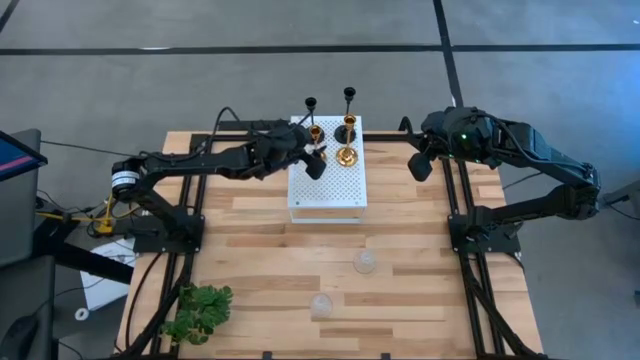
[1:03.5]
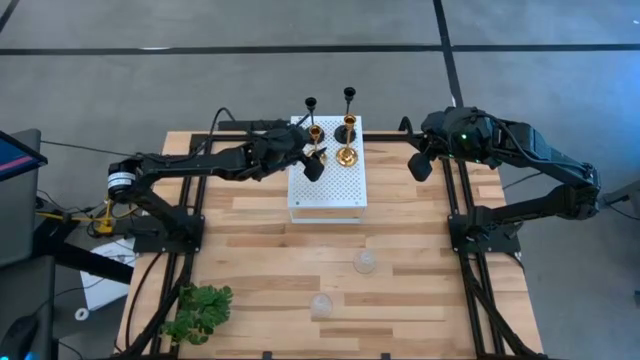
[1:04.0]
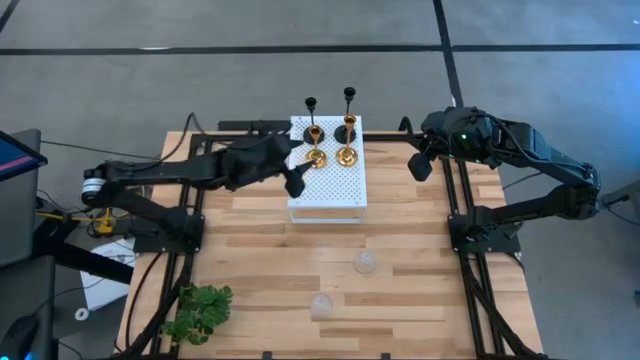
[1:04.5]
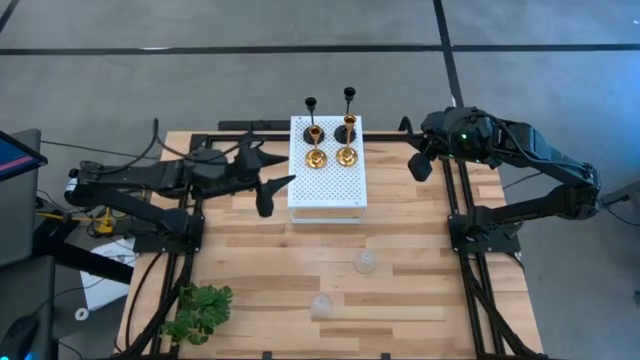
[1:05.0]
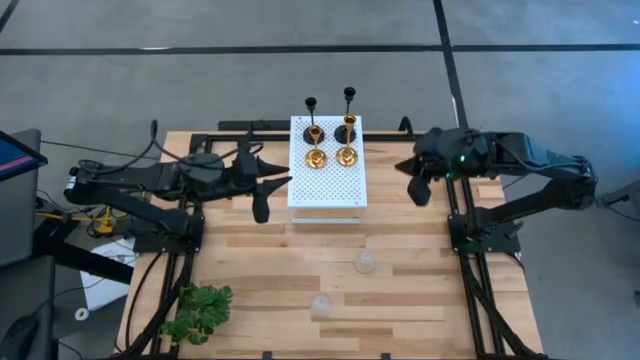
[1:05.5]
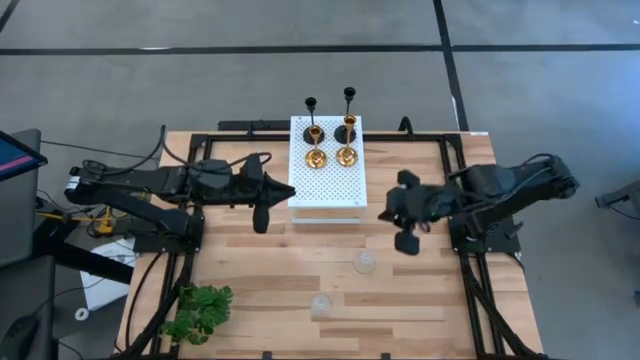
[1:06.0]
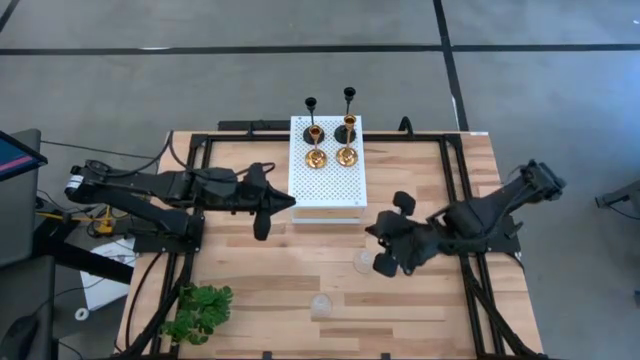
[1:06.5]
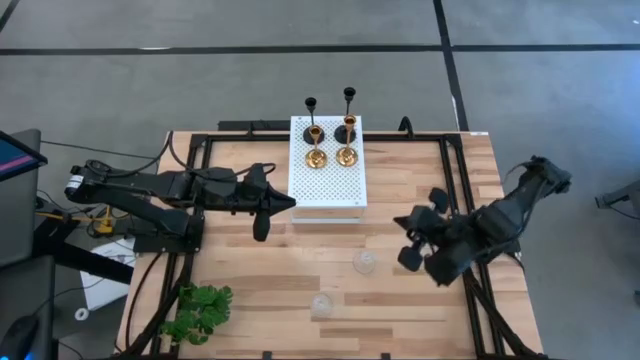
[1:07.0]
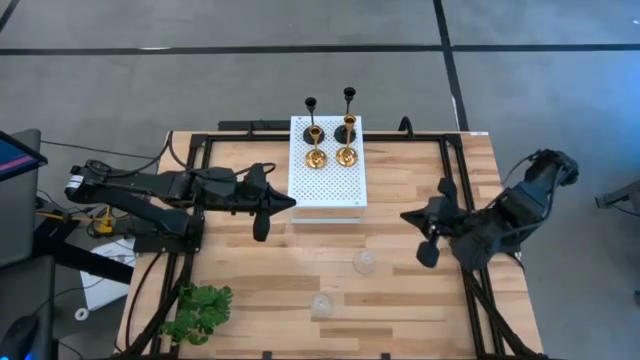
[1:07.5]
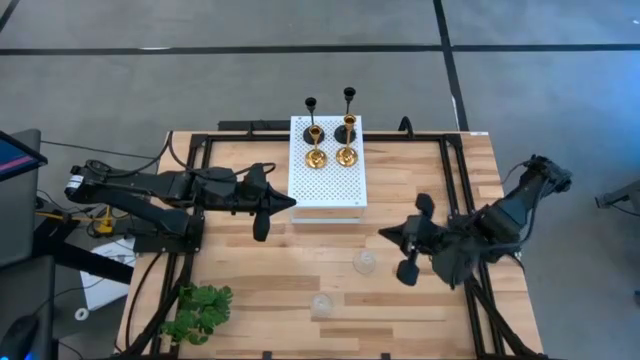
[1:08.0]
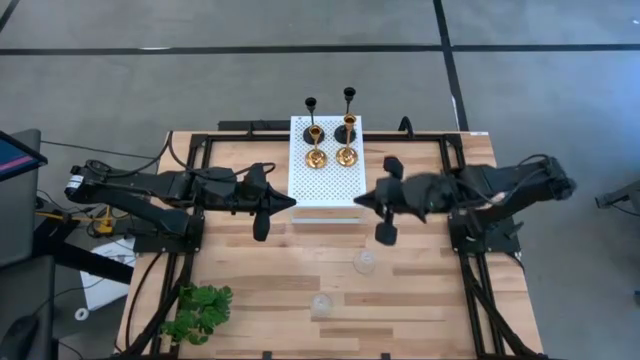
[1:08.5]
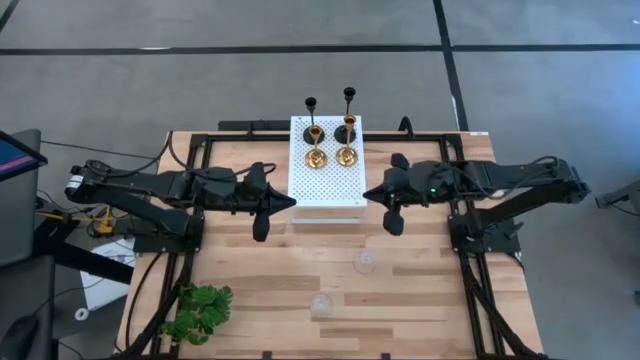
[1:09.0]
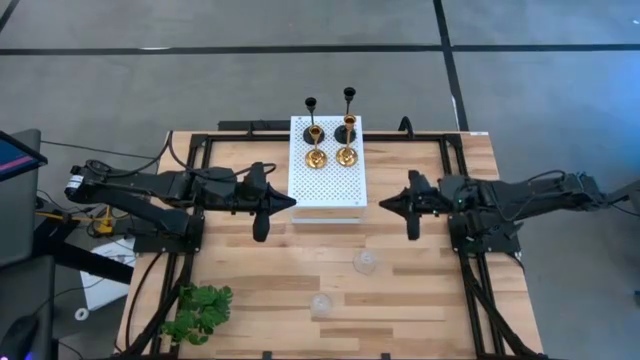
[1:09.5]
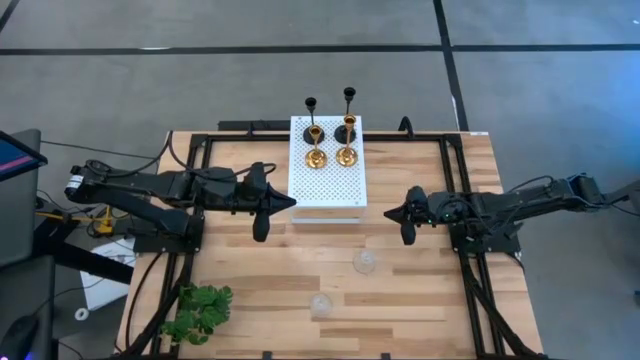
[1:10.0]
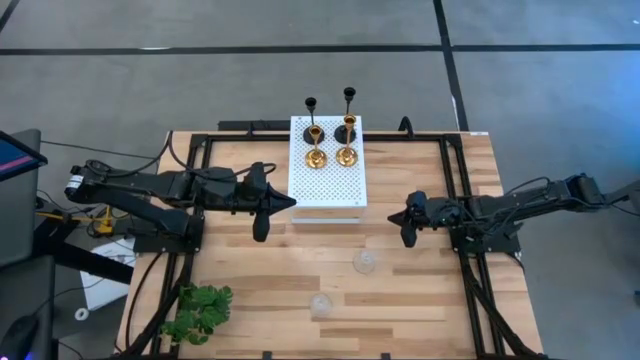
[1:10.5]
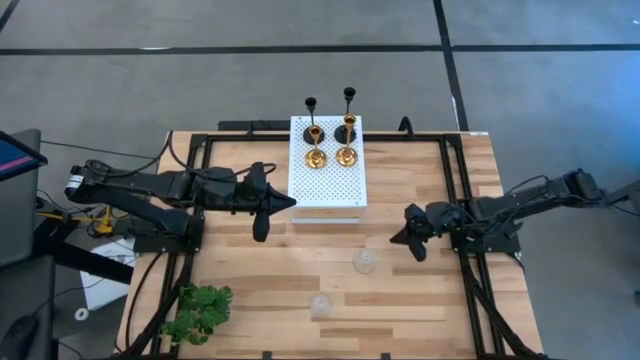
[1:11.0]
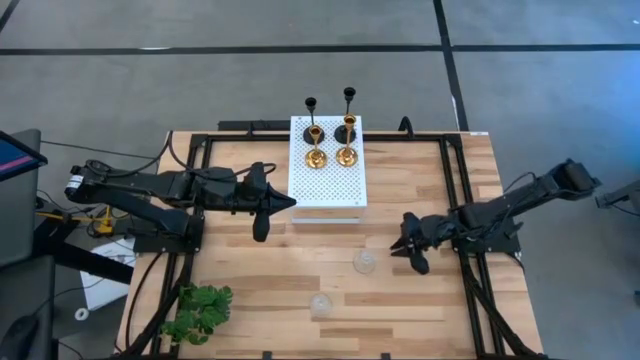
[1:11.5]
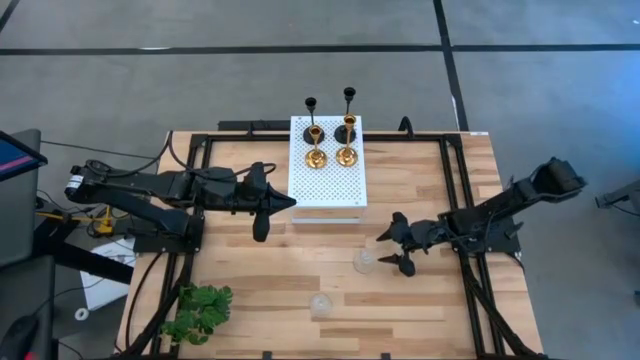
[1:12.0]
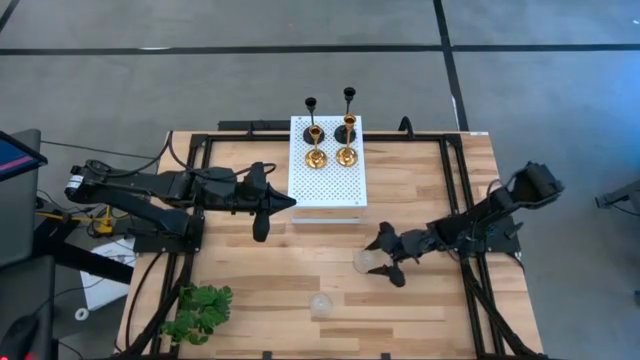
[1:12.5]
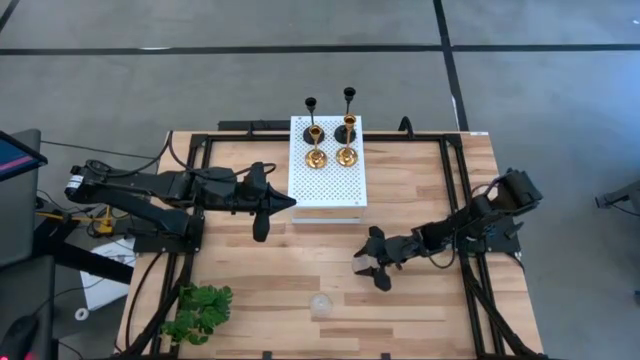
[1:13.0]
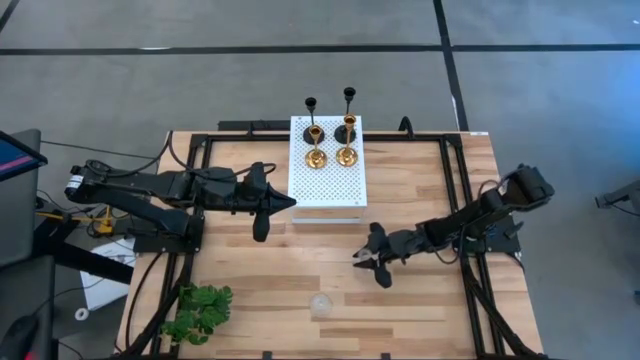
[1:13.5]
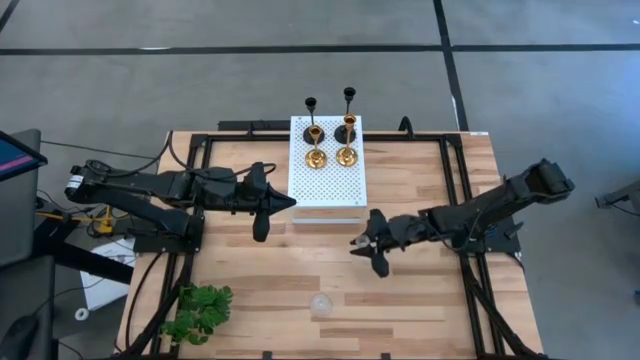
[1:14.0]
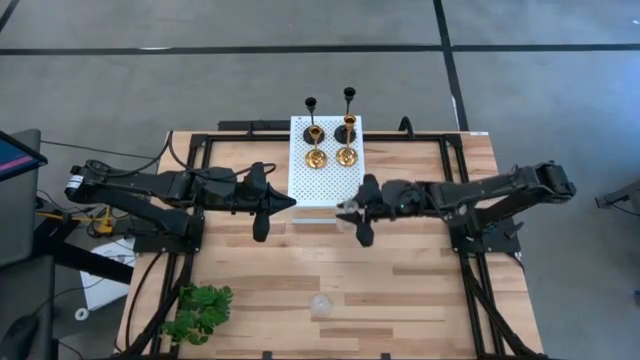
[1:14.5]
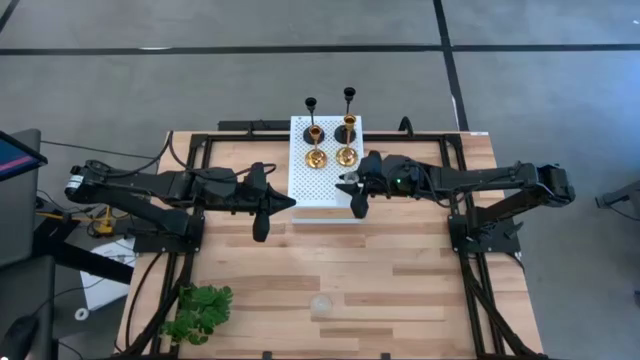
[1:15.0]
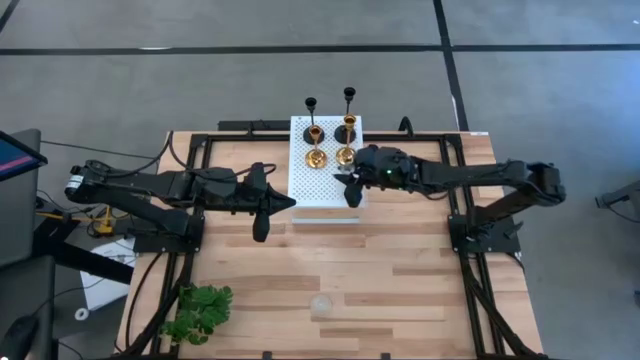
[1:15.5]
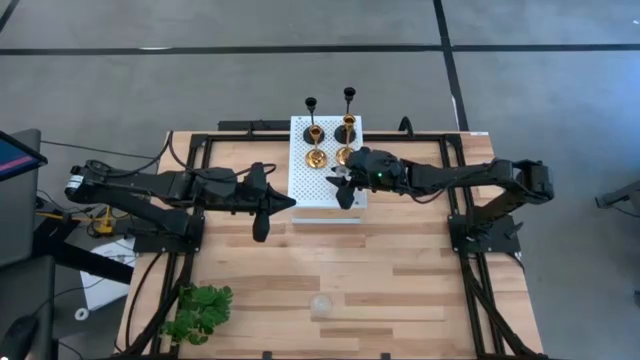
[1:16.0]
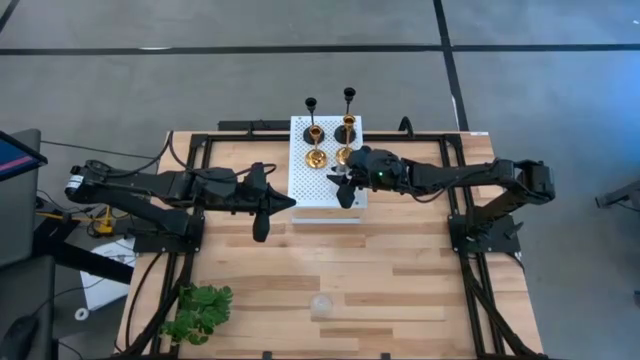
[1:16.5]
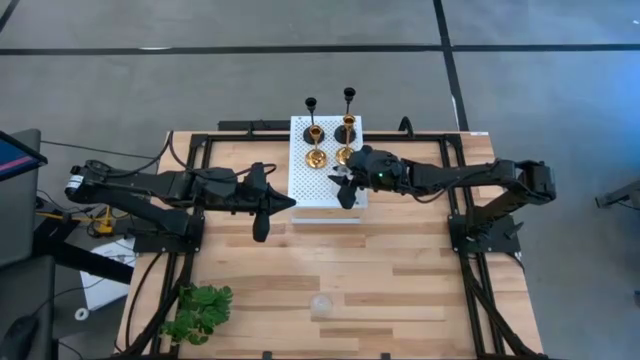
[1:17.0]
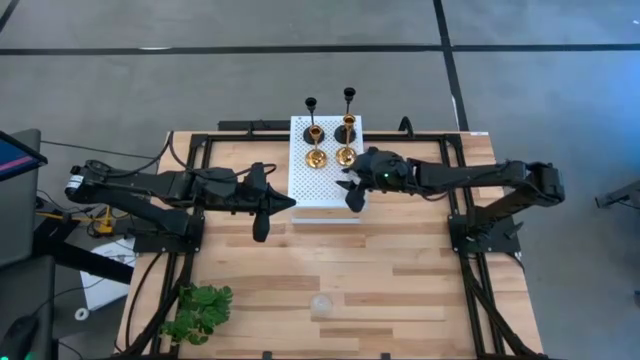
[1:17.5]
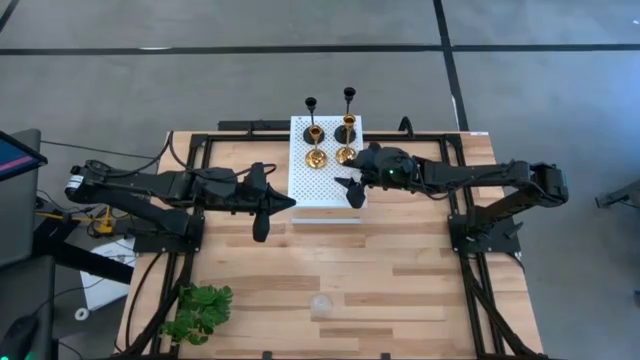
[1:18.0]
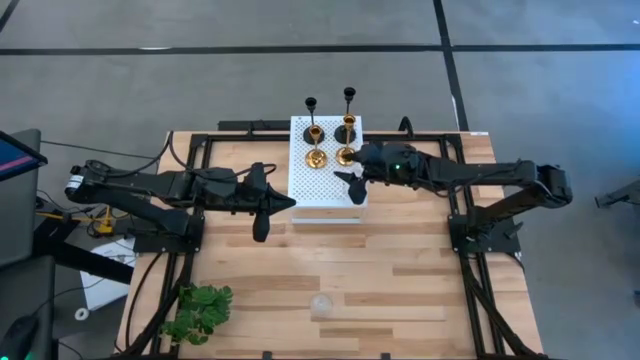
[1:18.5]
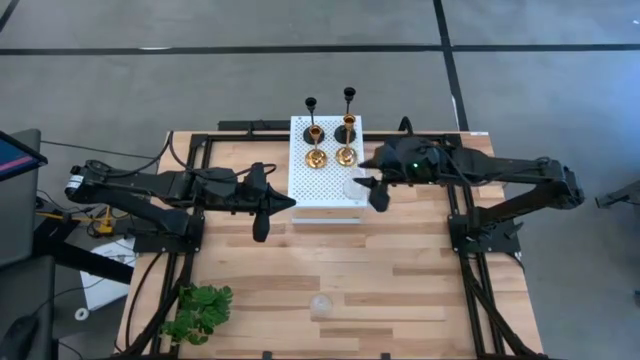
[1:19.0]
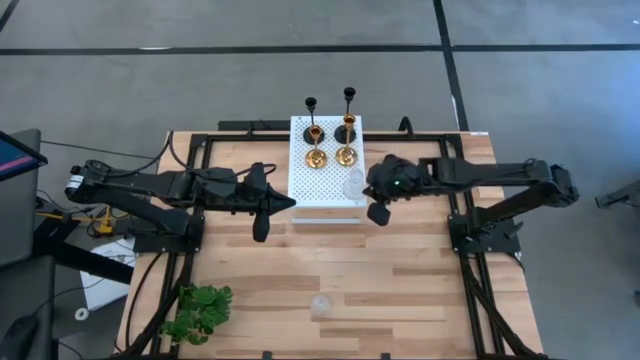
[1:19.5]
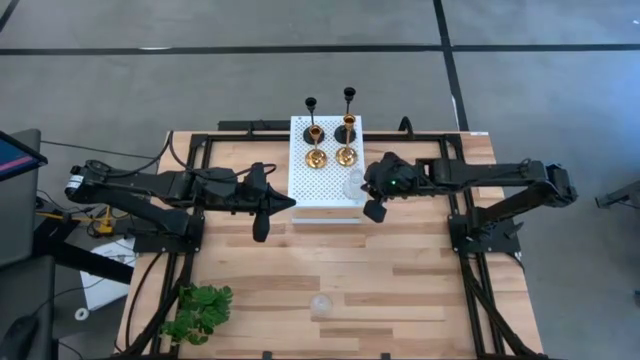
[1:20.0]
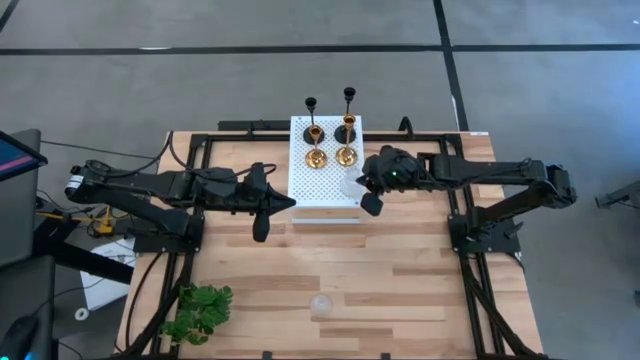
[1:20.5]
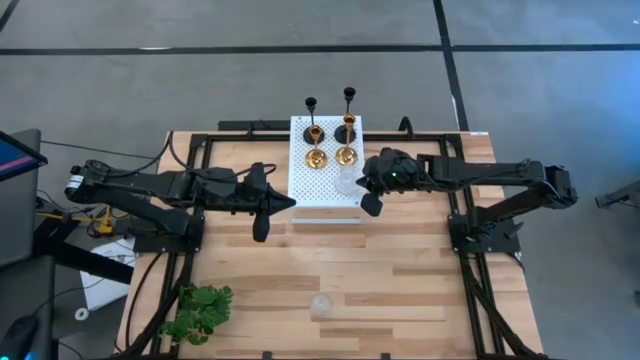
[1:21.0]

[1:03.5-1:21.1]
Task: Pick & Place candle stick holders
Put the right transparent candle holder on the shelf

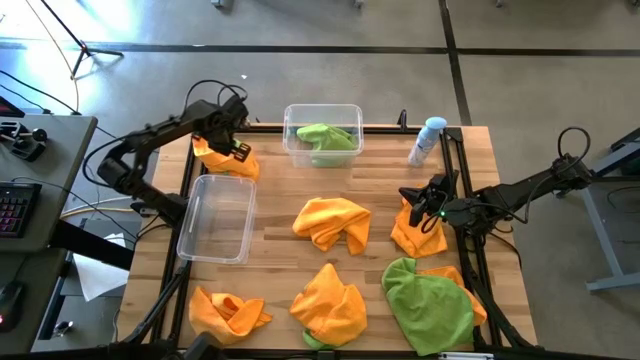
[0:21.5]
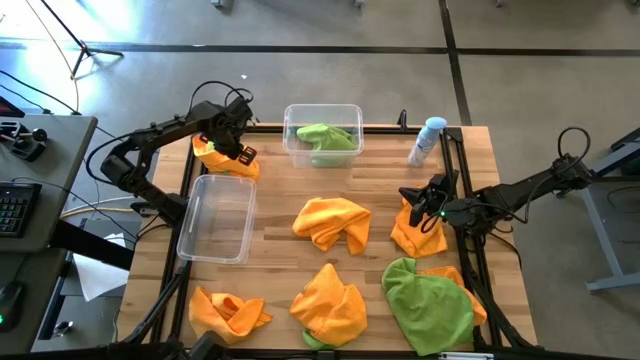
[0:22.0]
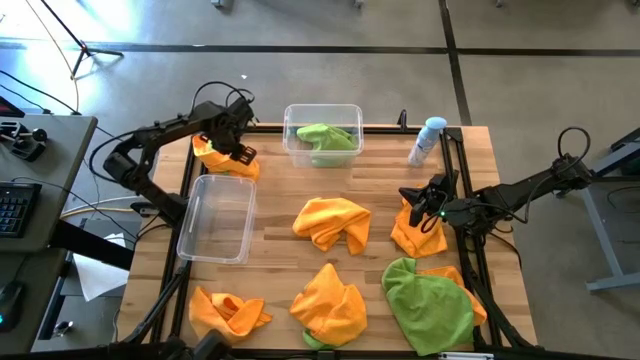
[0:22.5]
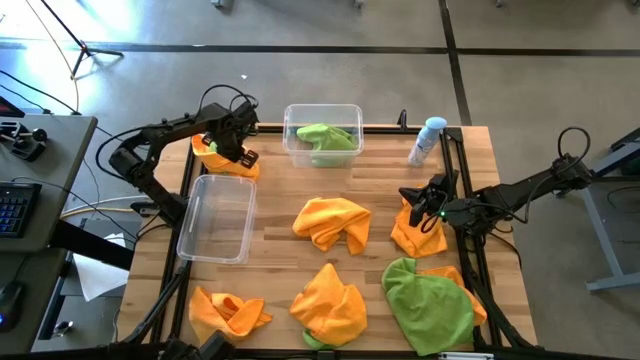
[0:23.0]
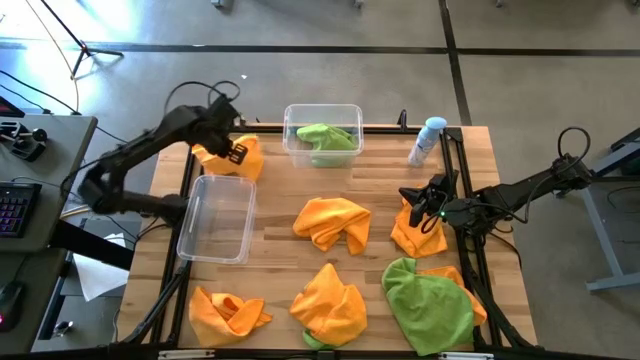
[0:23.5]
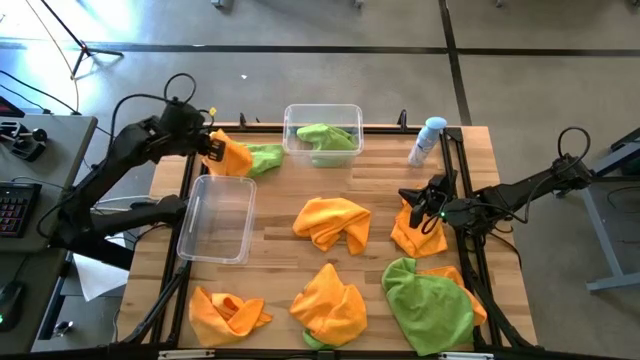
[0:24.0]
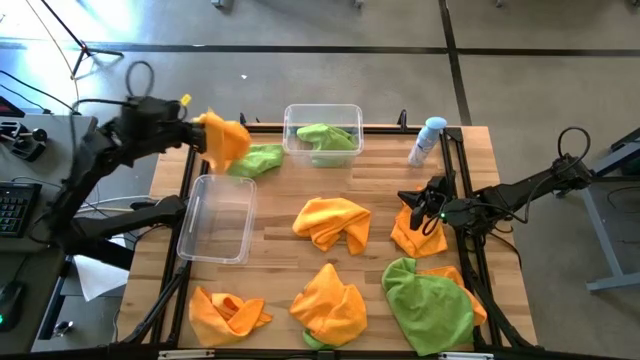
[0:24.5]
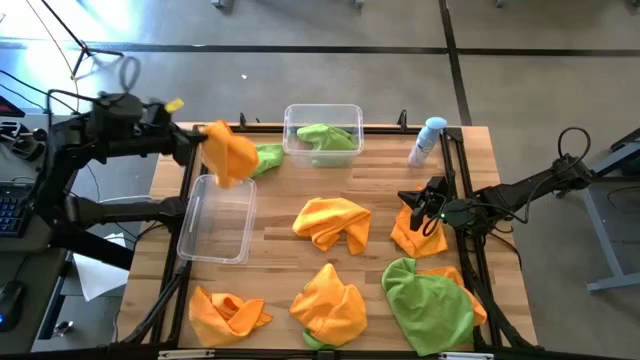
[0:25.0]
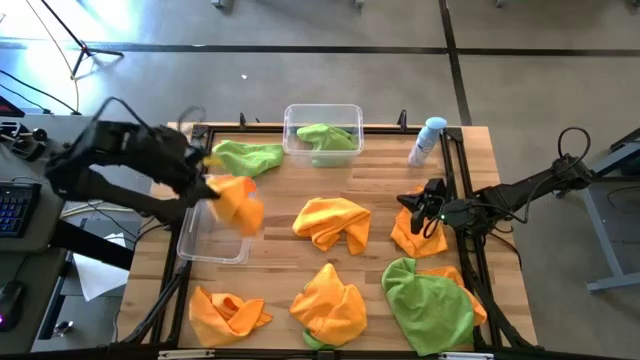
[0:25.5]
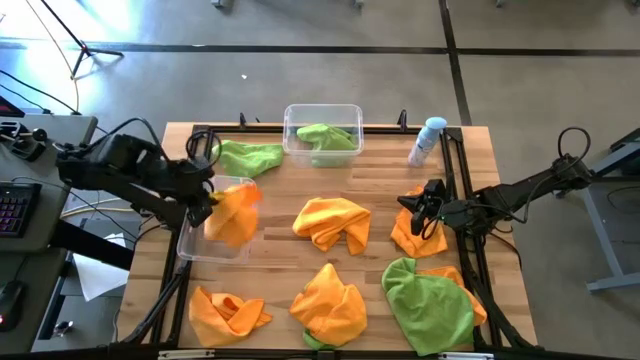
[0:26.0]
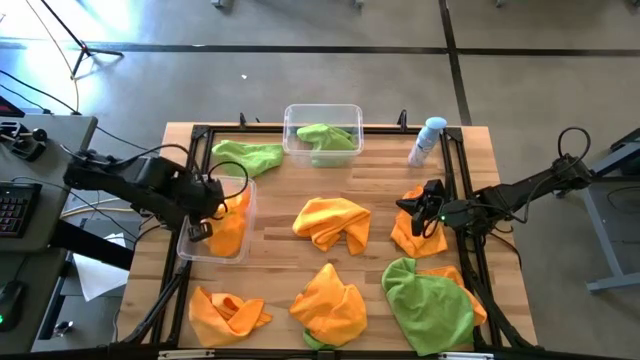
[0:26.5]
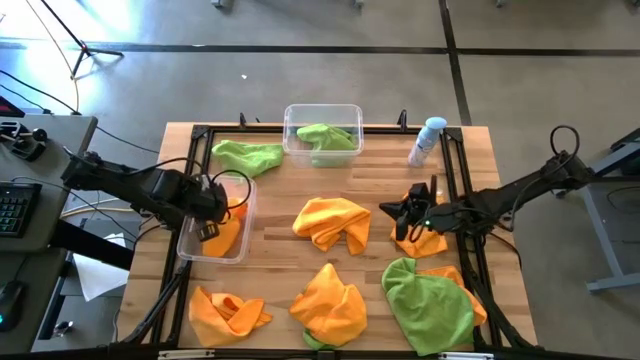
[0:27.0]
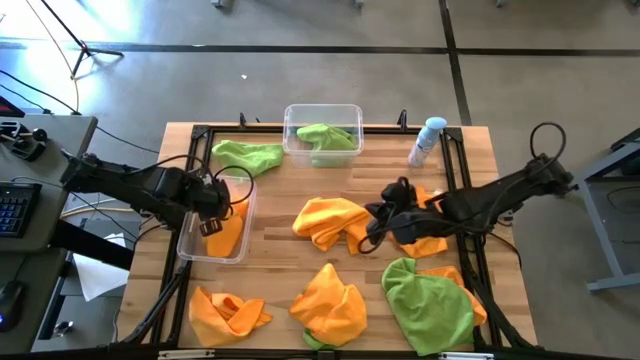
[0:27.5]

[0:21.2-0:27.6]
Task: Sort microfiber towel by color & place in baskets
Put the orange microfiber towel into the bottom transparent bin
